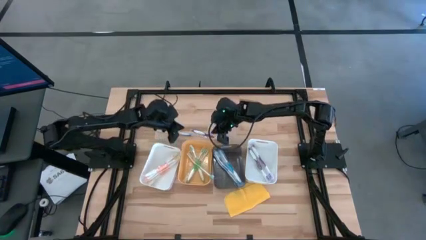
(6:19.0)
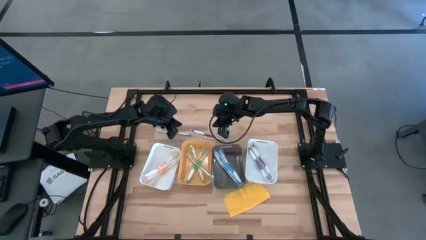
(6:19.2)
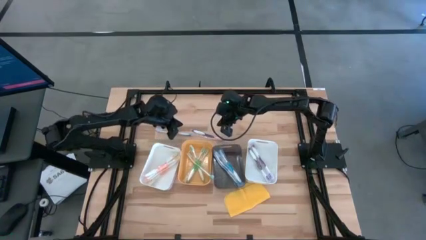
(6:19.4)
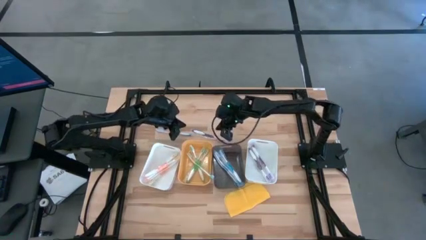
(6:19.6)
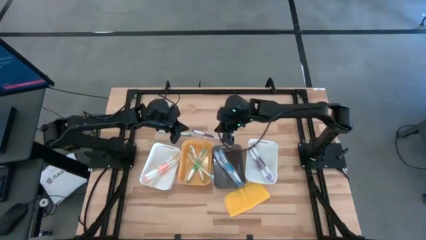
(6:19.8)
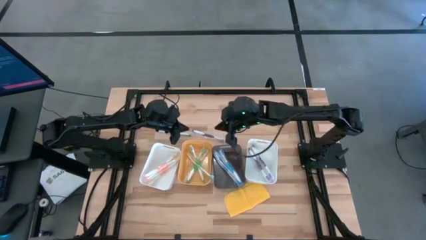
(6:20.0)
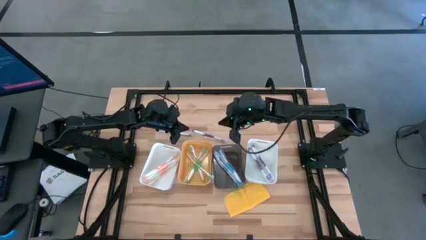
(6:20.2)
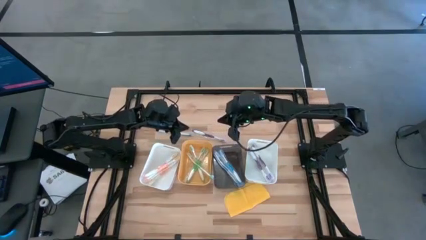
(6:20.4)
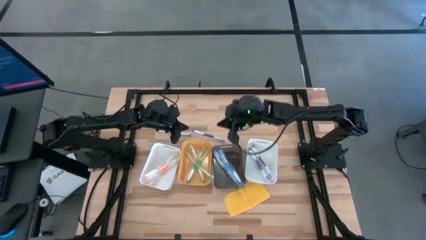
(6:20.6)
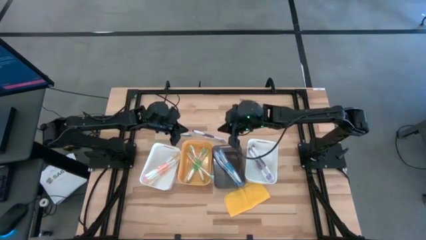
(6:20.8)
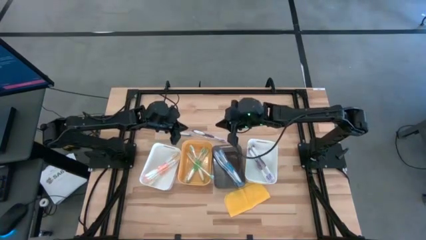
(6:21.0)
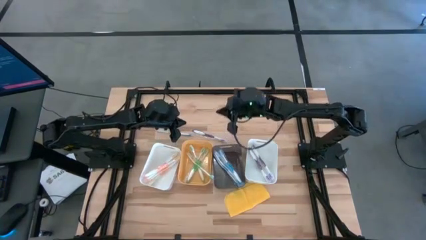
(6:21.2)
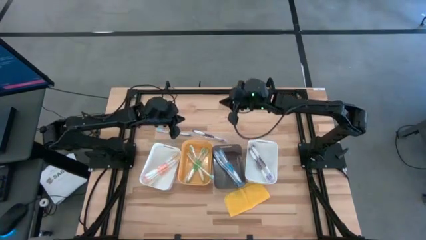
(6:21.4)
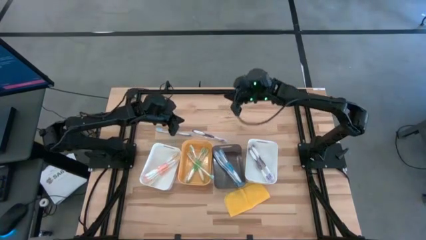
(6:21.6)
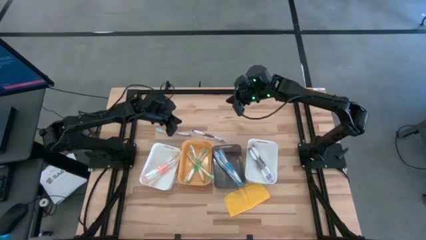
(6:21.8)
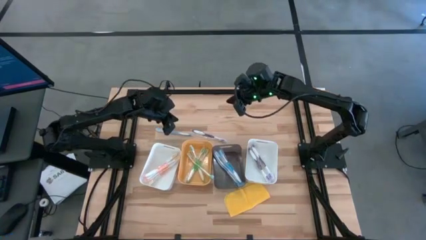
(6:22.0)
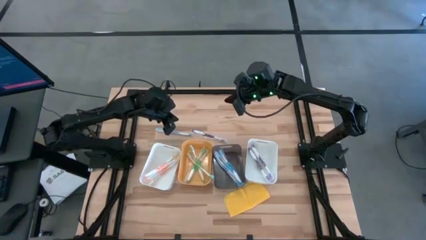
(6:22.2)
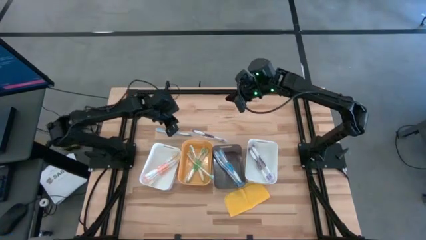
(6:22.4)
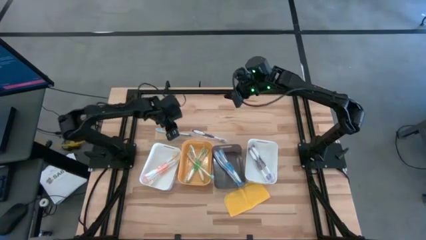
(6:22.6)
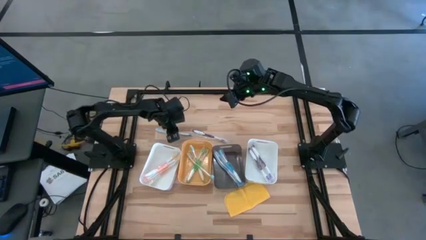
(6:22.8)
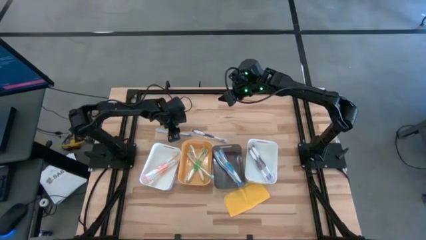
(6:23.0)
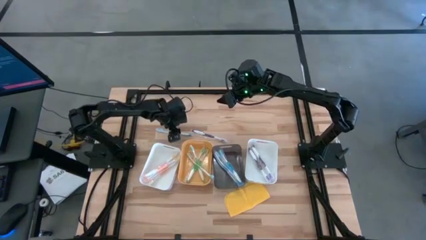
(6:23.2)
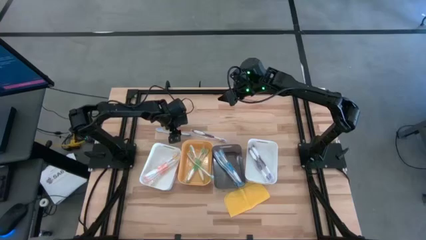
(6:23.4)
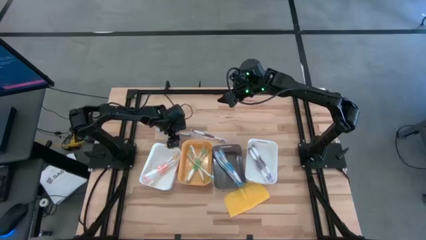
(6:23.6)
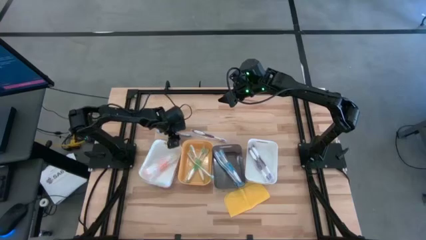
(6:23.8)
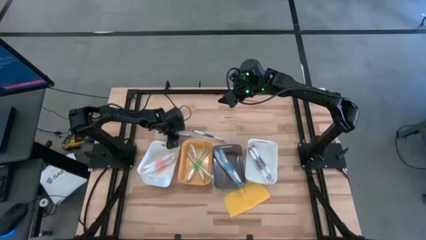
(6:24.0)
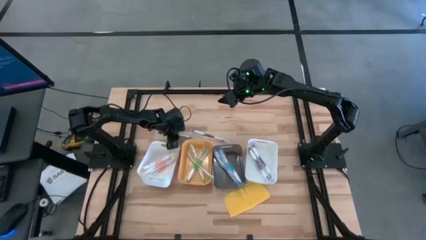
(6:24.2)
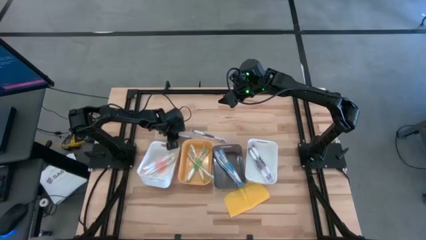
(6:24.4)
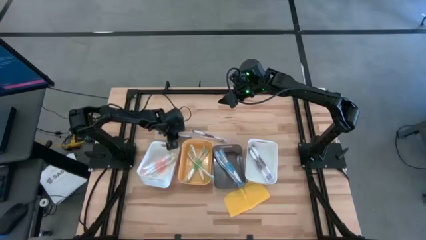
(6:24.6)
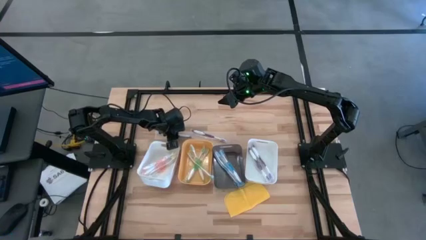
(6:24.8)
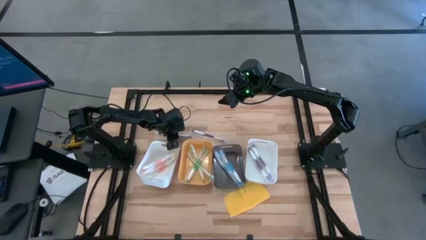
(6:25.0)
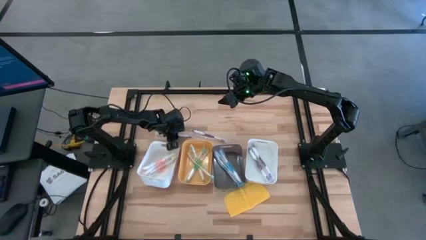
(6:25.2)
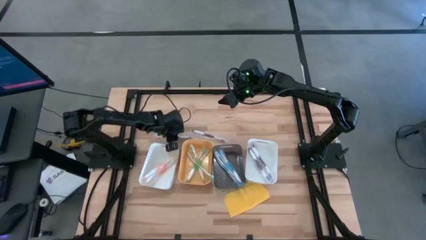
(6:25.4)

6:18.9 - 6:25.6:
Task: Pick & Place Toothbrushes
Put the blue toothbrush into the black bin

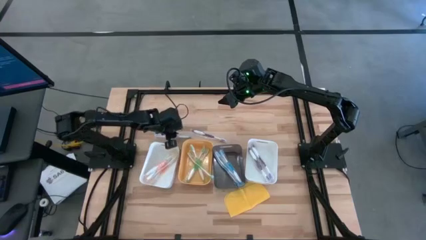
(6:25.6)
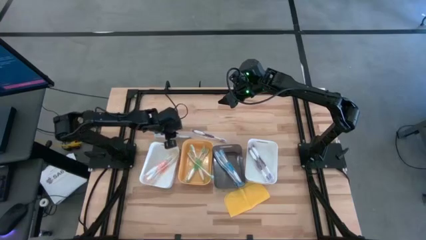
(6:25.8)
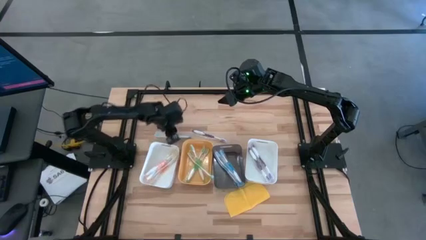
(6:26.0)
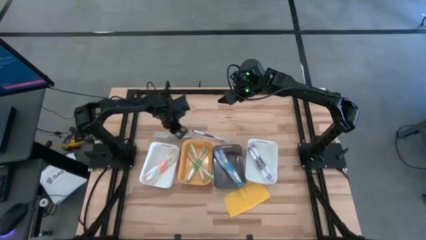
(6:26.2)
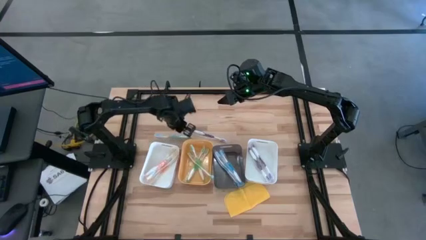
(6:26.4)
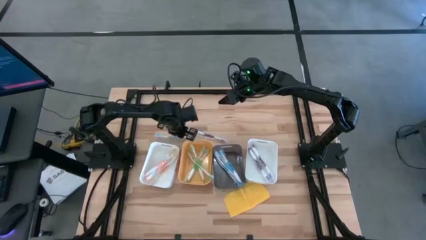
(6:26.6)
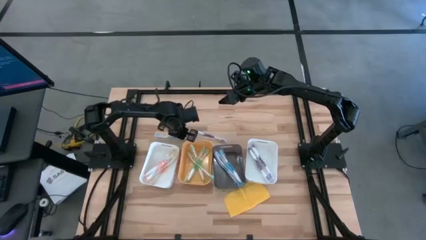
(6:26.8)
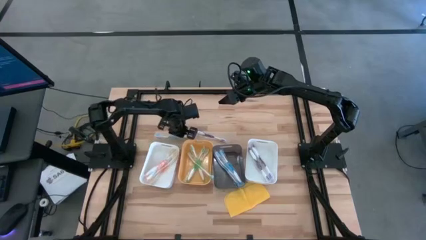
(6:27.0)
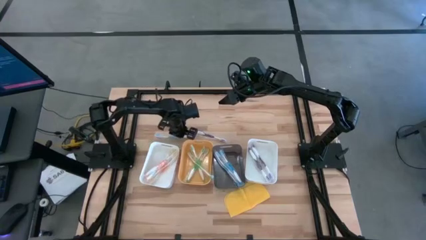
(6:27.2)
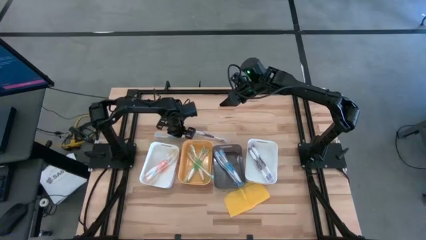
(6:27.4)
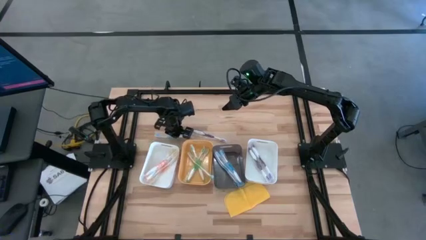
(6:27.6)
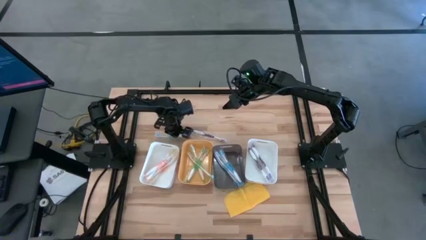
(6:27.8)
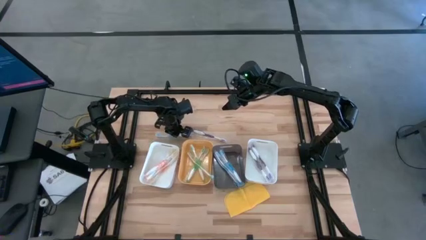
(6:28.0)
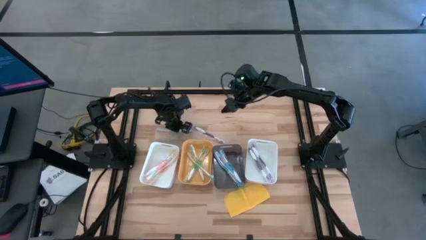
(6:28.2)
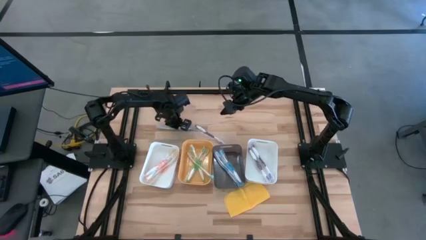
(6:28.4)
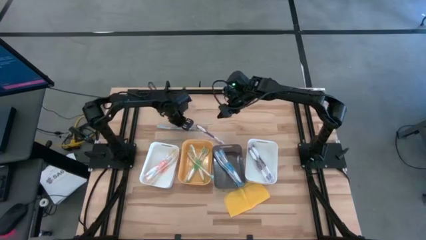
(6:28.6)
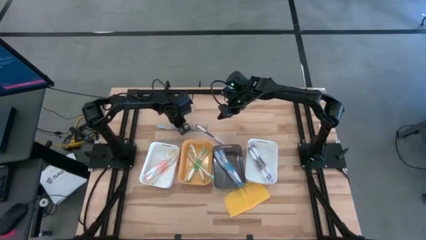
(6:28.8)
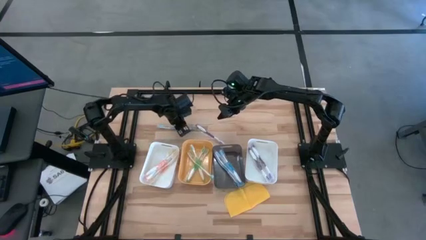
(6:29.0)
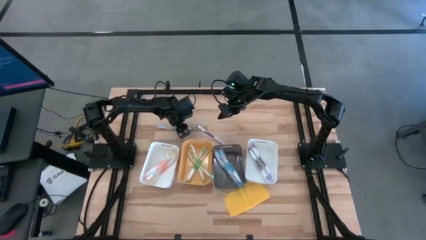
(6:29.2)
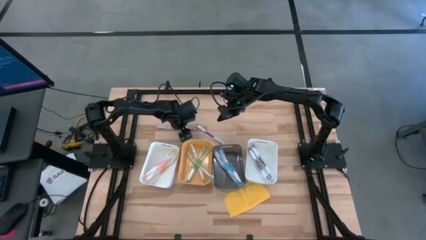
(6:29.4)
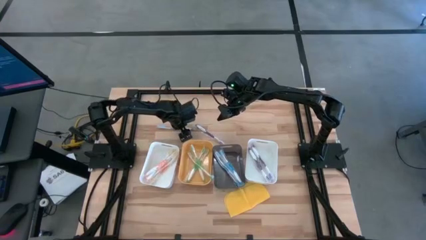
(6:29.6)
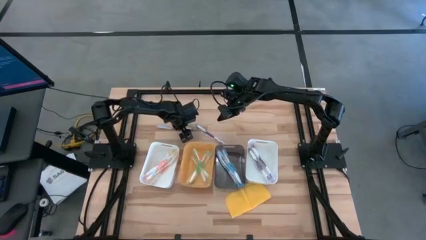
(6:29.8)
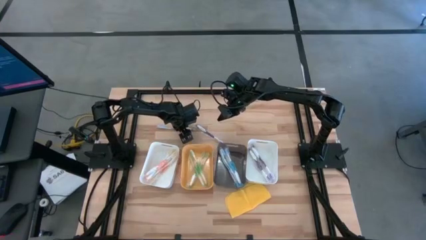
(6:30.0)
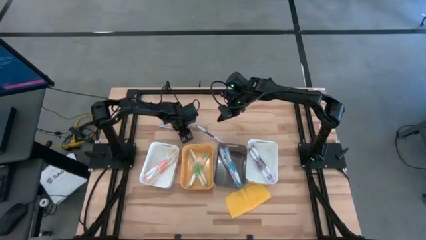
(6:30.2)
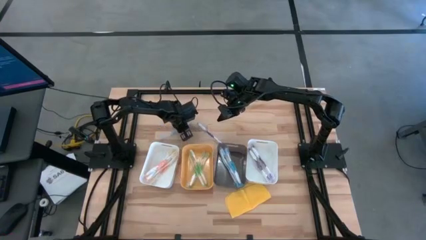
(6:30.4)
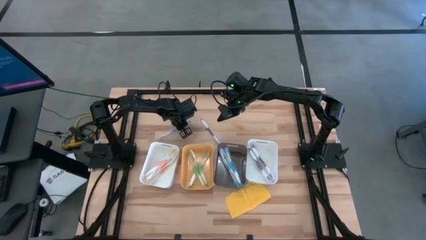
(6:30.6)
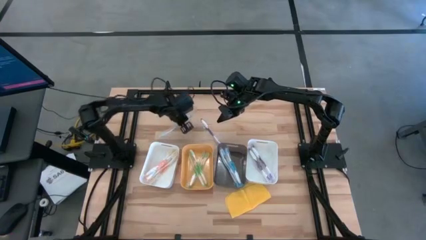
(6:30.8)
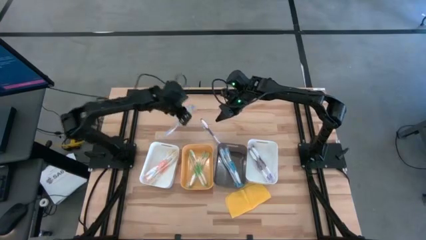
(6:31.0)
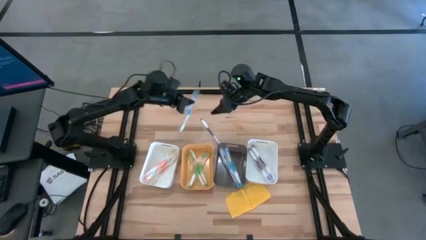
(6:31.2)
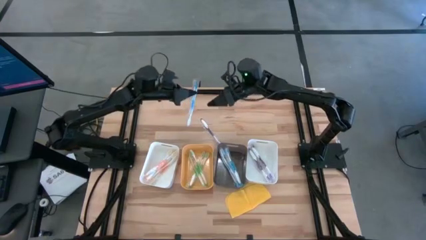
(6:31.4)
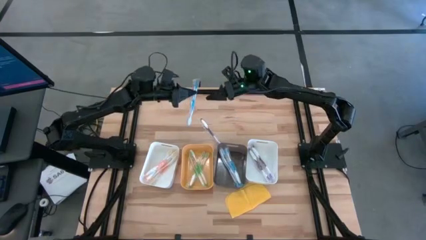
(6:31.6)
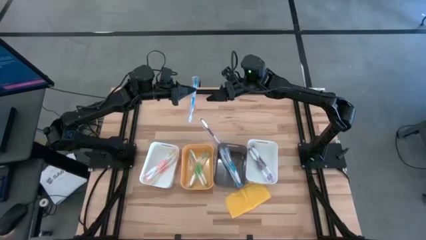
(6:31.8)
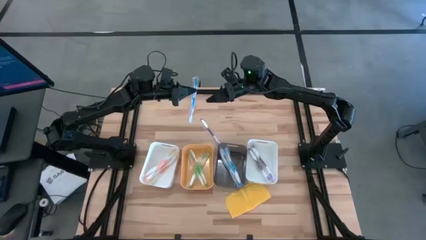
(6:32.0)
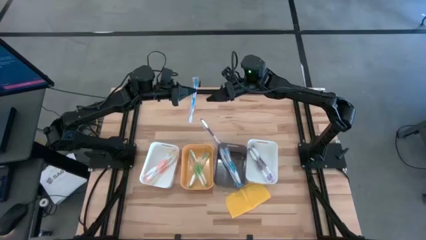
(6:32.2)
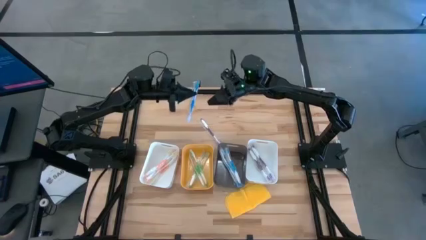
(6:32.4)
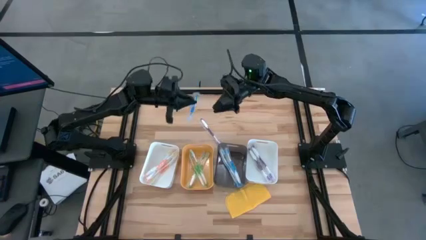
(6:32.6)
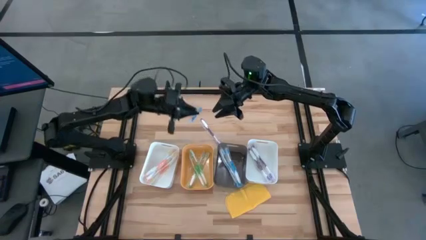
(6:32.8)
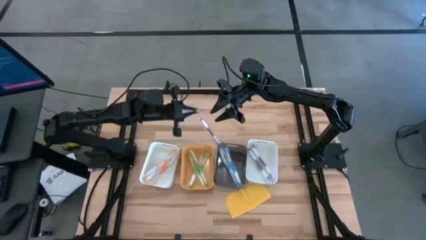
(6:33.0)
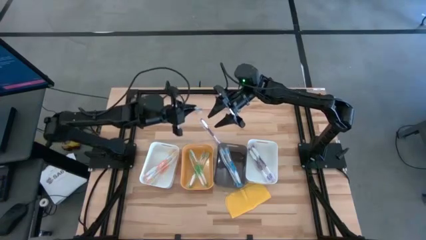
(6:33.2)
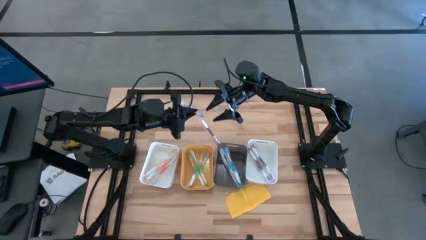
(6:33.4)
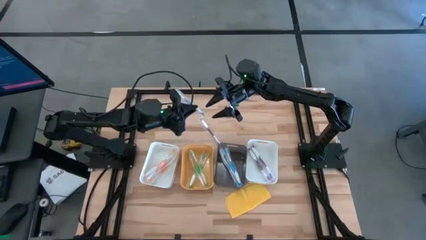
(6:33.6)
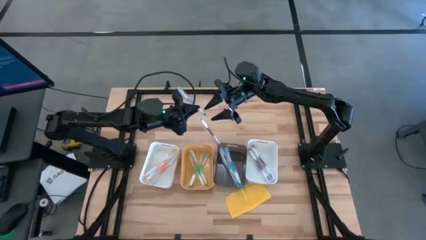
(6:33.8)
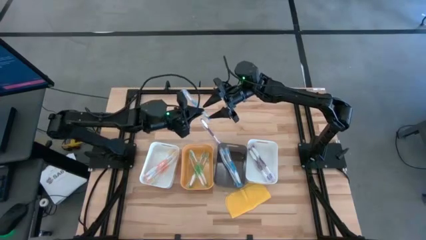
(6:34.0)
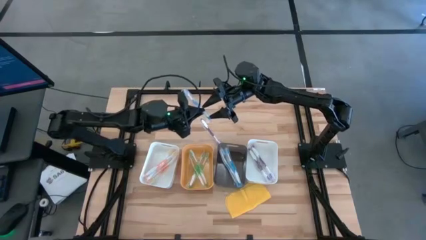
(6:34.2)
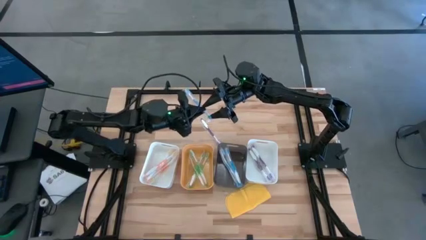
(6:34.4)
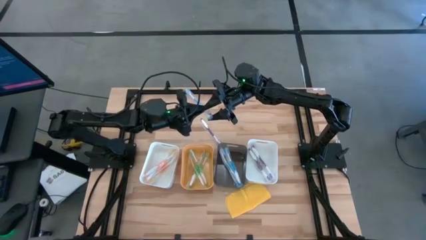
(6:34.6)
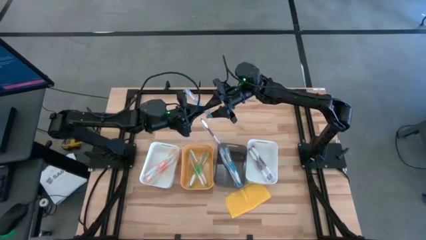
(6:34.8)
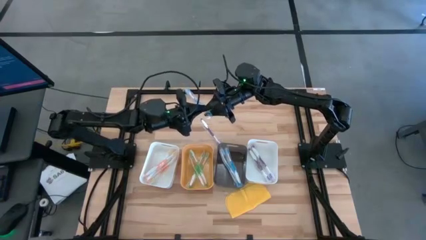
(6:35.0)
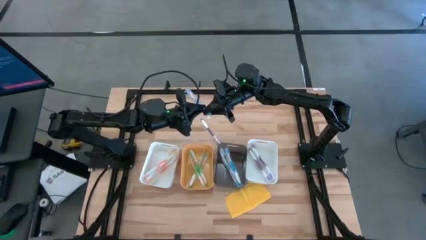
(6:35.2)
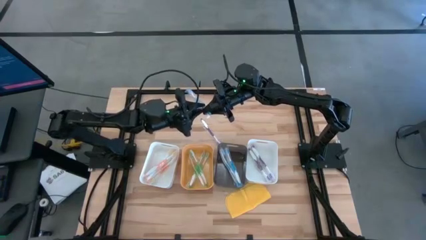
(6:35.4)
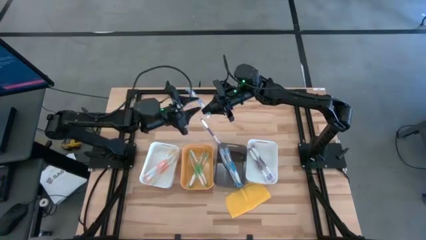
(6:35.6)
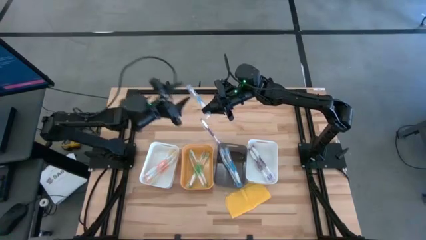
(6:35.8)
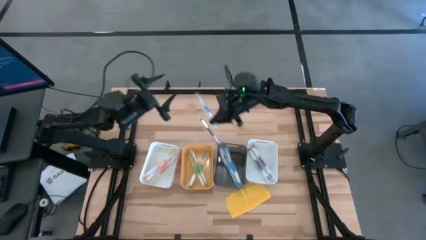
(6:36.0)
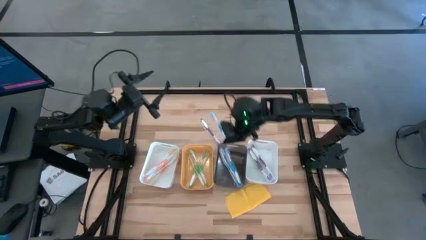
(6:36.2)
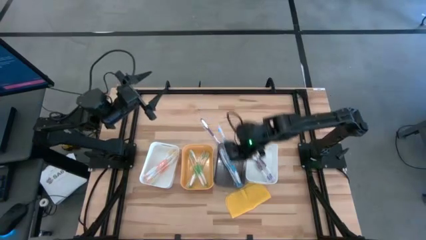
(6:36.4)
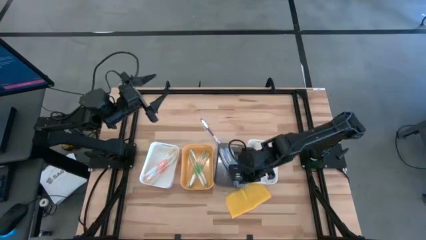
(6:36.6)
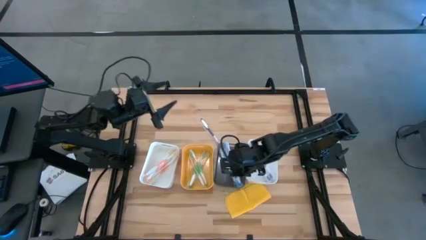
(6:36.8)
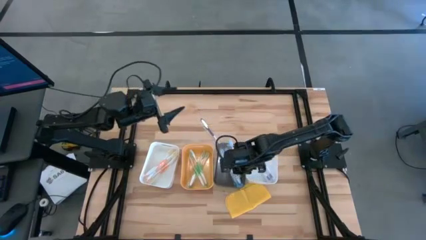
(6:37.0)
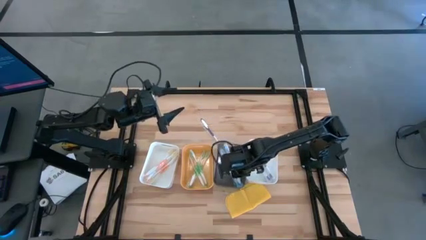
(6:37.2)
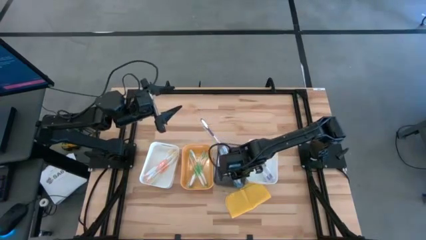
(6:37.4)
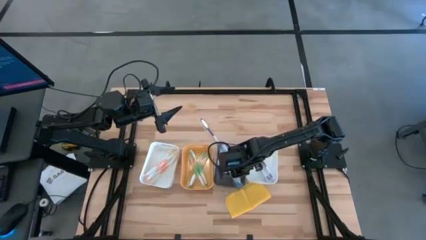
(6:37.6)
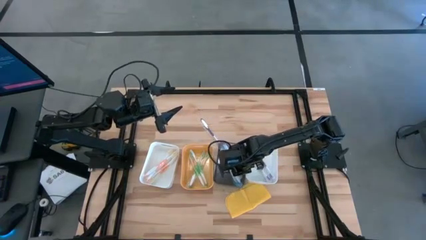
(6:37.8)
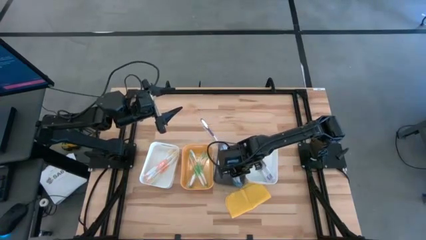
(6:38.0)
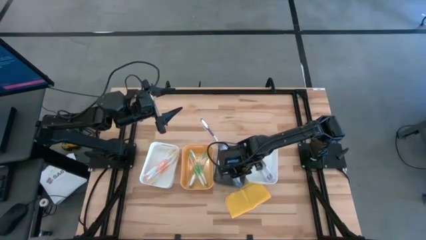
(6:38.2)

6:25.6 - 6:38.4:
Put the blue toothbrush into the black bin
